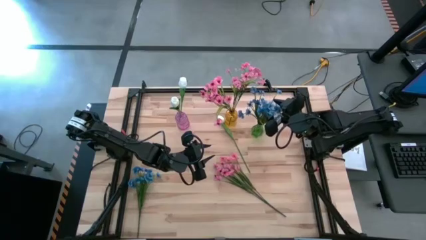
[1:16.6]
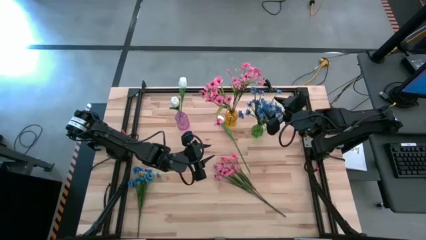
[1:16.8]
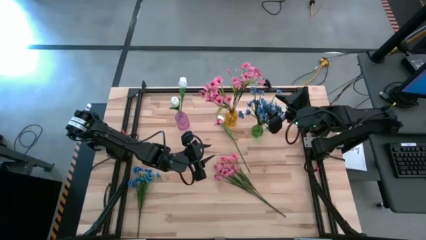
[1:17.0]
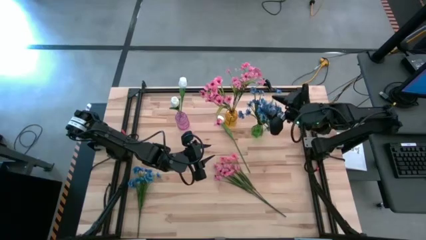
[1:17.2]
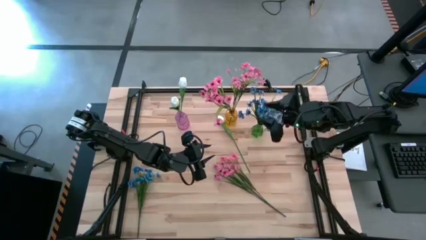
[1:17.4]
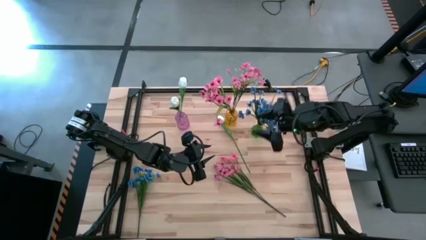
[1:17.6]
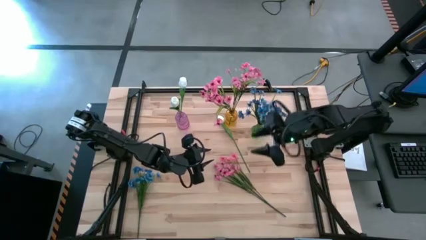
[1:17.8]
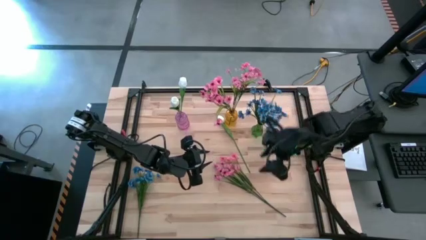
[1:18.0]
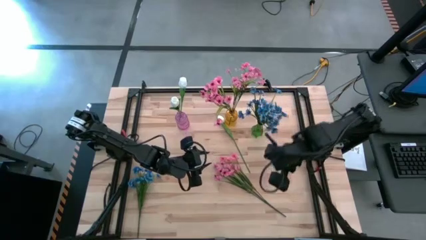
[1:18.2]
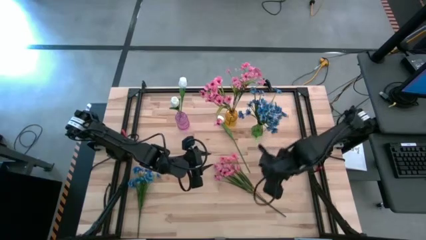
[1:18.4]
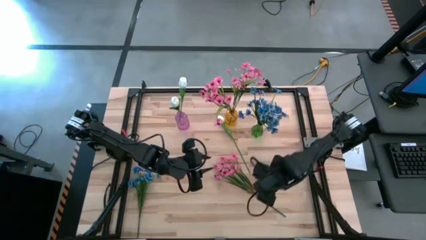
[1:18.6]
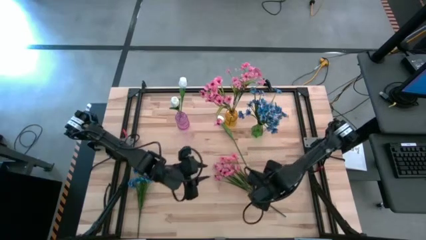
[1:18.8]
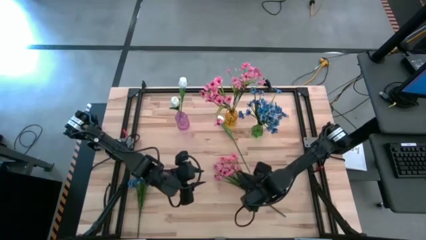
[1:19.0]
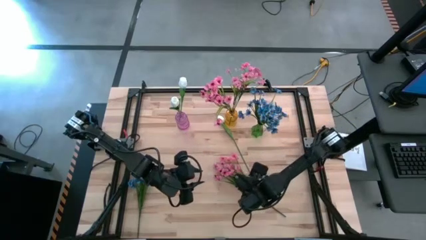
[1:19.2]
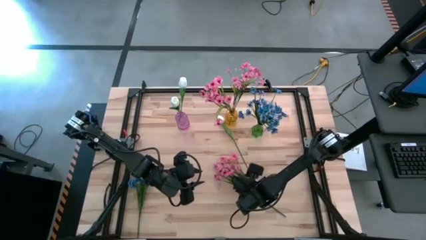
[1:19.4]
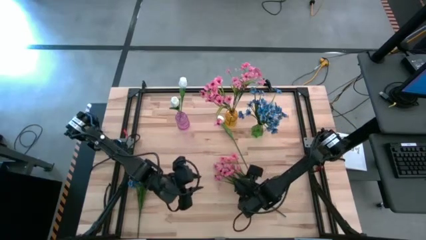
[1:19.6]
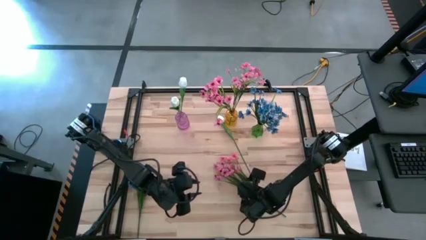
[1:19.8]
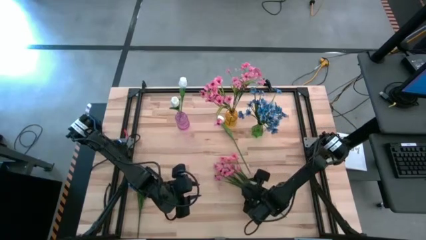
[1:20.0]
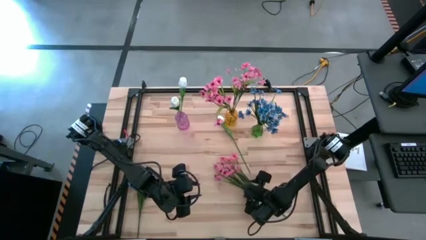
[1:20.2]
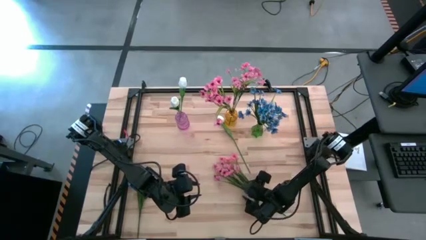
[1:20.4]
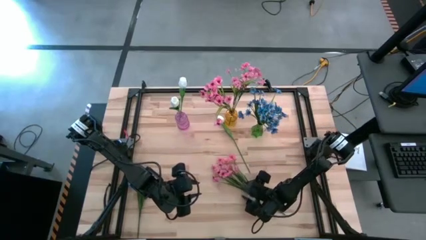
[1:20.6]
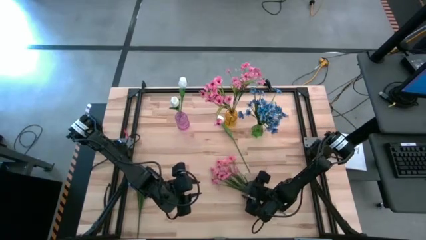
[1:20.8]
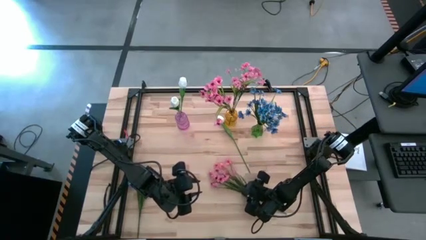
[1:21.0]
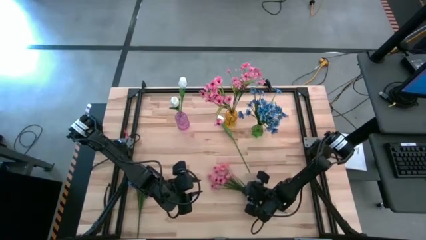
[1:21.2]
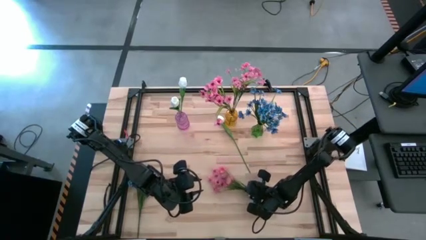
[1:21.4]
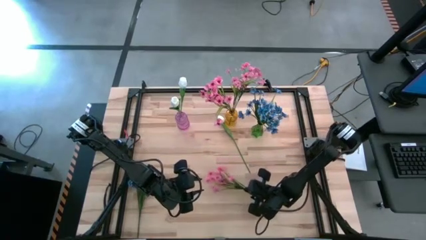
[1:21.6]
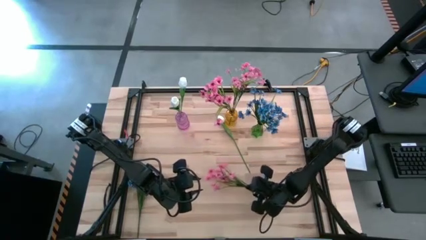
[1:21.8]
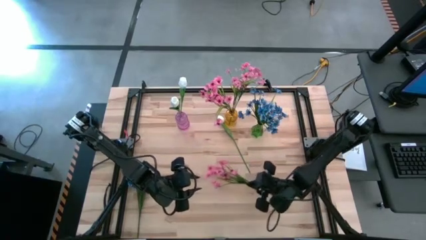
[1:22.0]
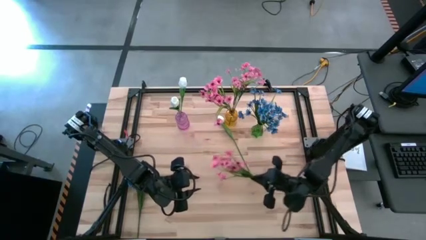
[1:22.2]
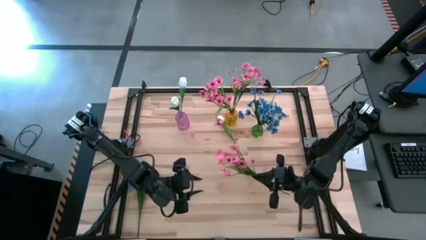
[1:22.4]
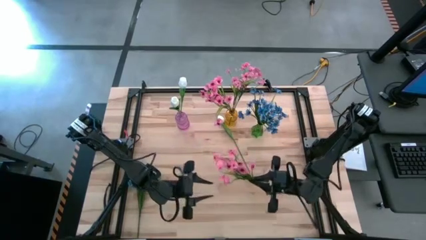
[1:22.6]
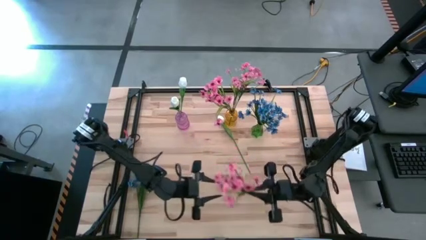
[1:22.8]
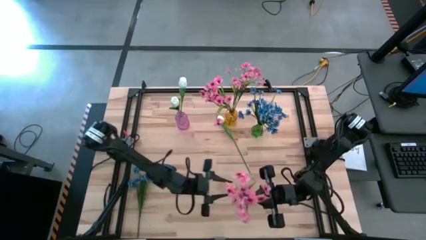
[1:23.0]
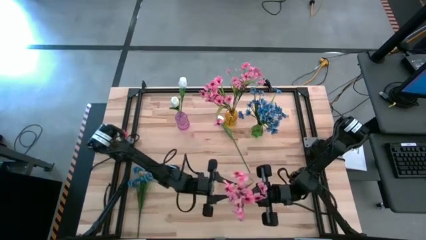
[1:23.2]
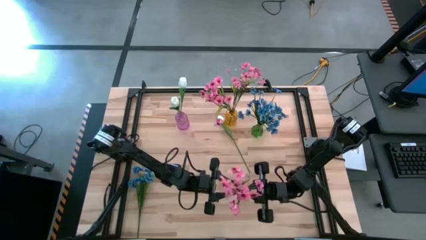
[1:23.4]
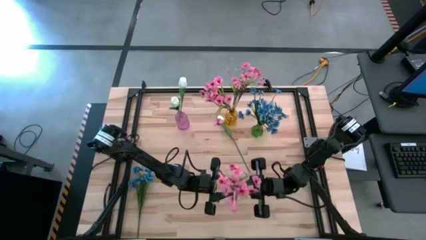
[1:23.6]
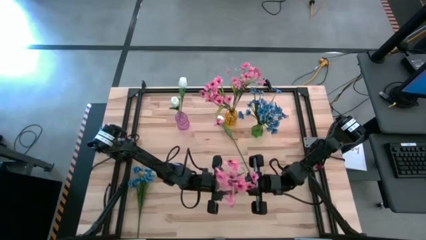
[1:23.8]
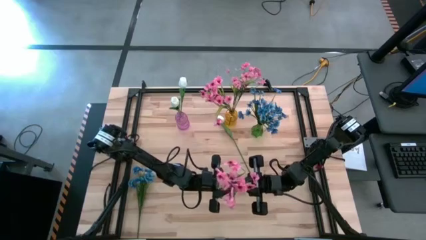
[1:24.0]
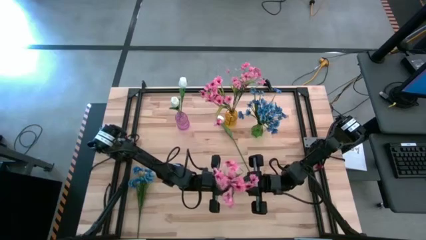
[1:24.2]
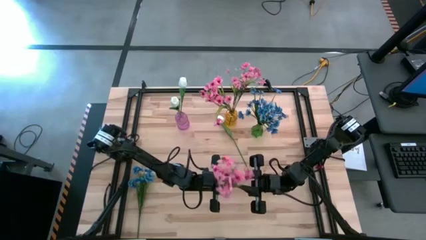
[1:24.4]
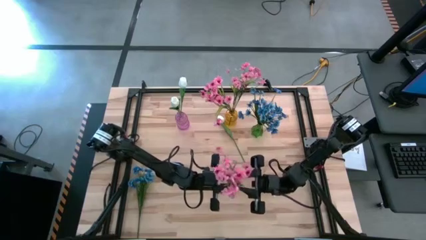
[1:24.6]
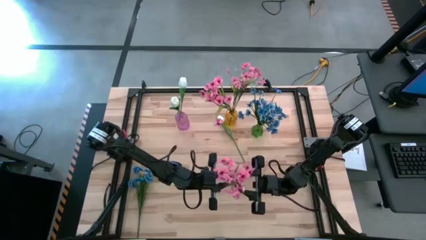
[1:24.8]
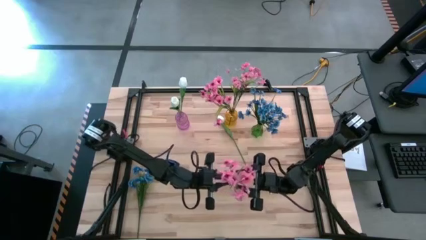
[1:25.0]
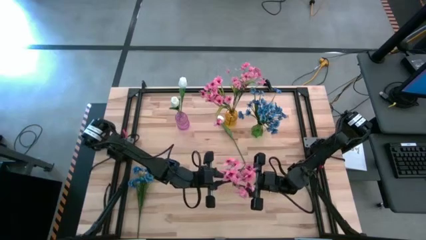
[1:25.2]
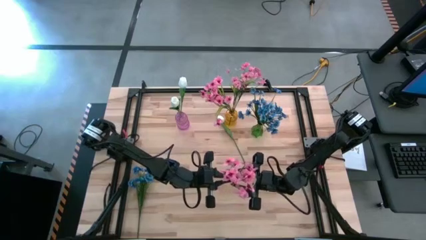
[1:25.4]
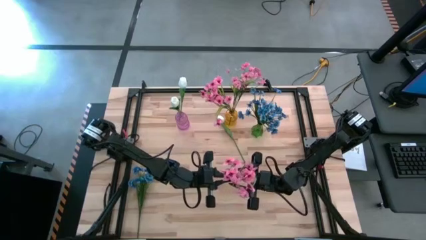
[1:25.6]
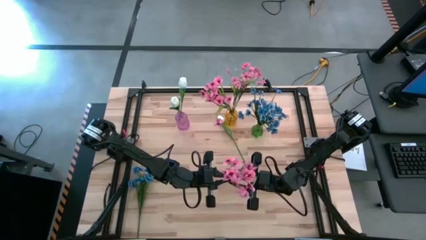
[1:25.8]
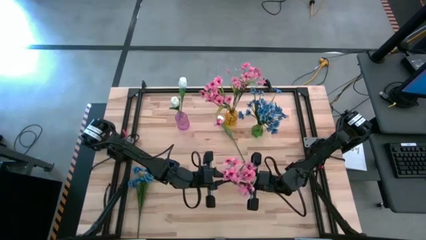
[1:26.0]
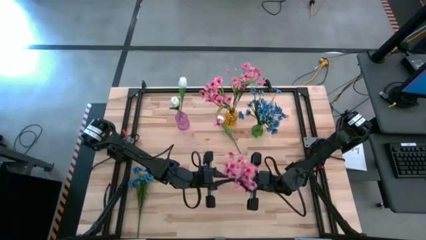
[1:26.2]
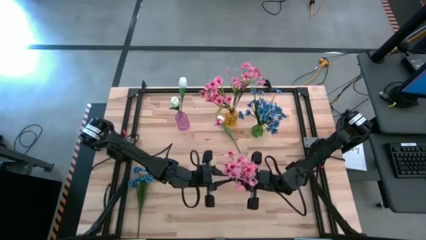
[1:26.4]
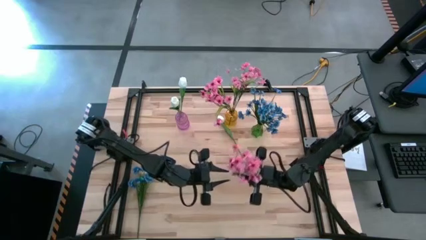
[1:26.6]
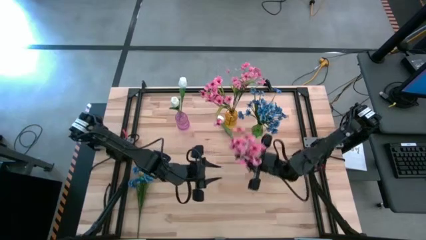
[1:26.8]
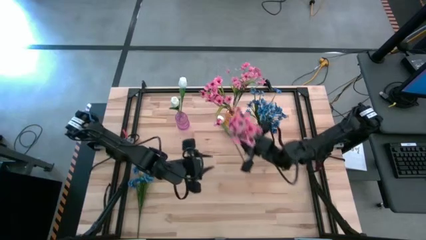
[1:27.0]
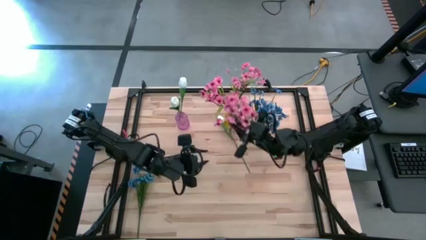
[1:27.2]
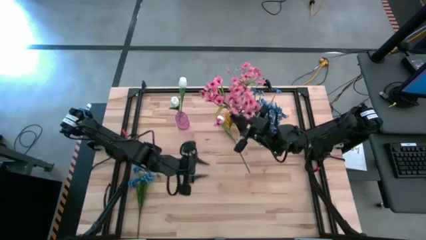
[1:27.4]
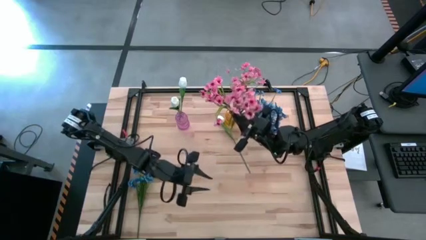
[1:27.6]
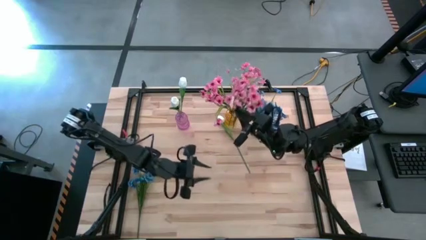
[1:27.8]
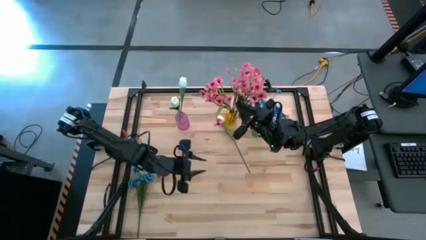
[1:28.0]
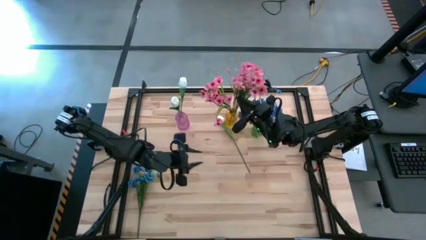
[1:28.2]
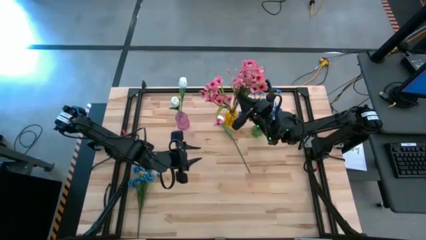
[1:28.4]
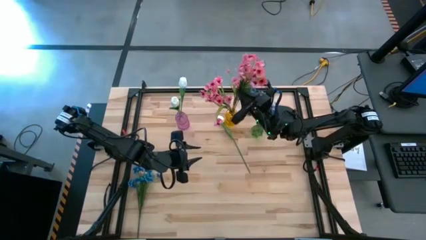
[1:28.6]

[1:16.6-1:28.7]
Task: Sort flowers into vase by color
Put the pink flowers into the yellow vase

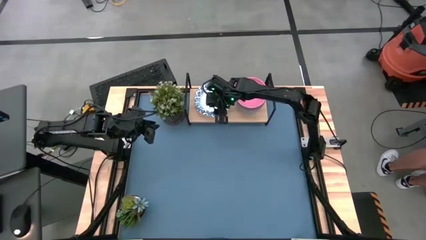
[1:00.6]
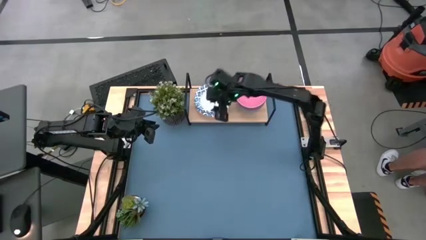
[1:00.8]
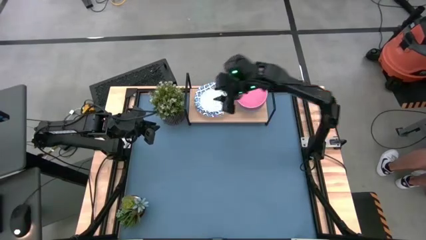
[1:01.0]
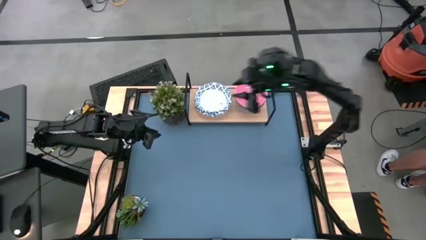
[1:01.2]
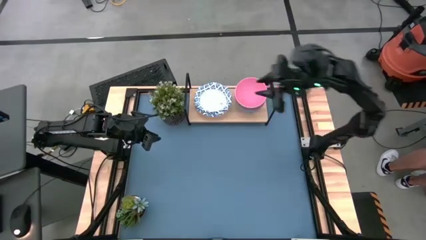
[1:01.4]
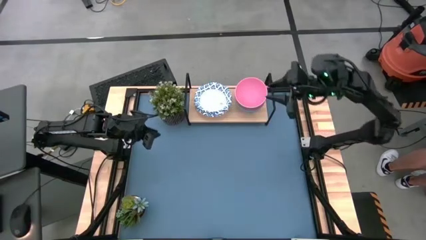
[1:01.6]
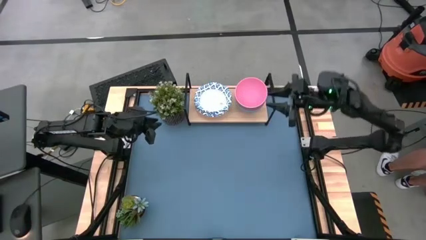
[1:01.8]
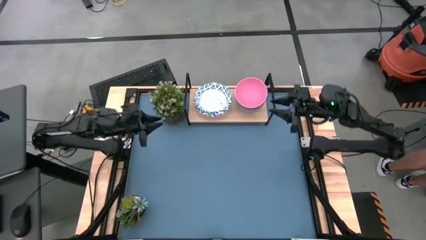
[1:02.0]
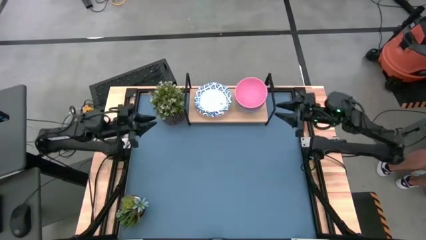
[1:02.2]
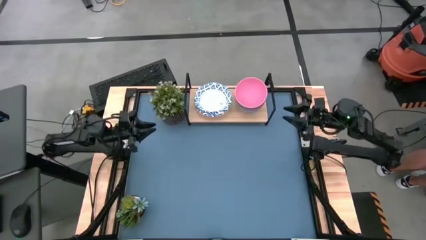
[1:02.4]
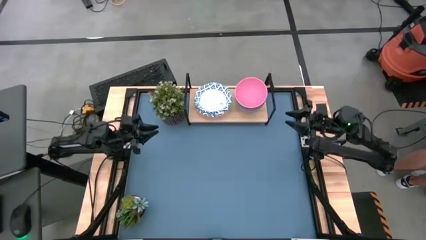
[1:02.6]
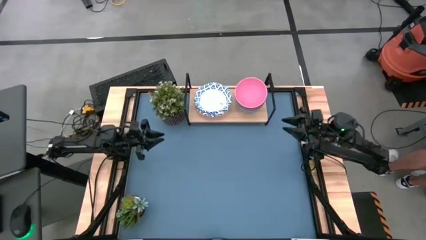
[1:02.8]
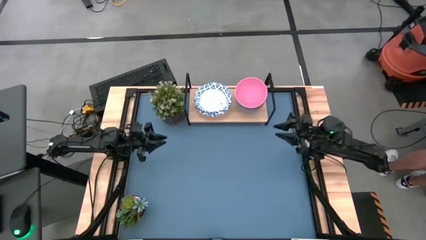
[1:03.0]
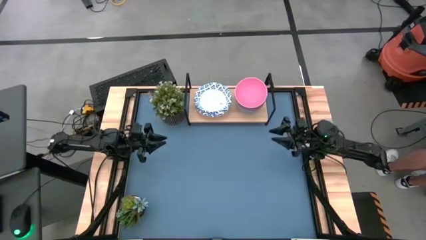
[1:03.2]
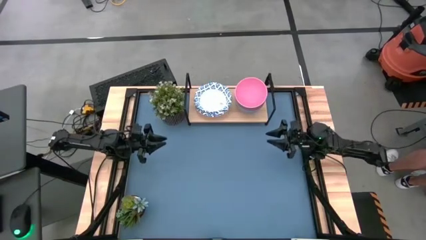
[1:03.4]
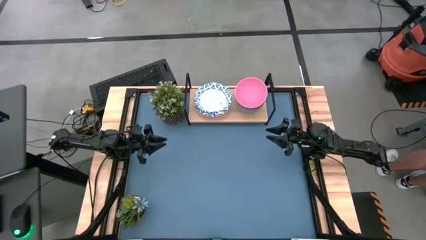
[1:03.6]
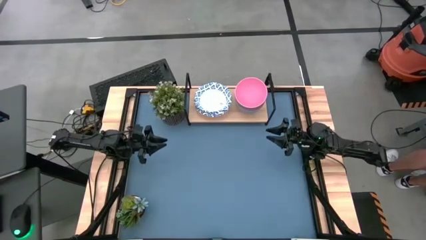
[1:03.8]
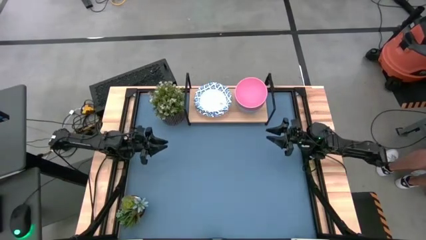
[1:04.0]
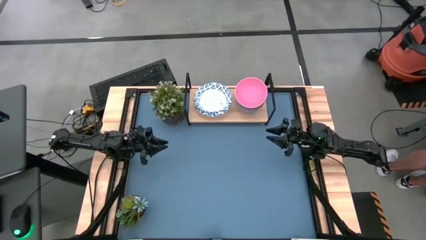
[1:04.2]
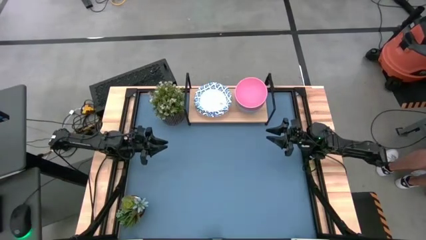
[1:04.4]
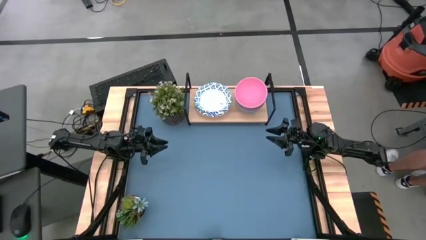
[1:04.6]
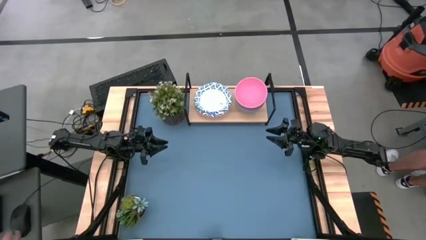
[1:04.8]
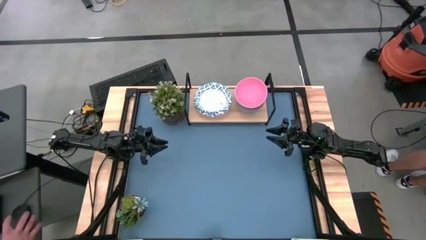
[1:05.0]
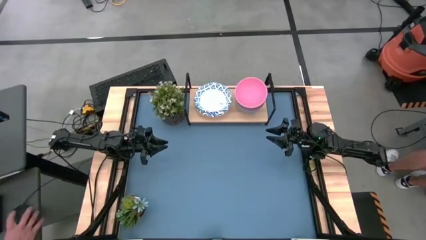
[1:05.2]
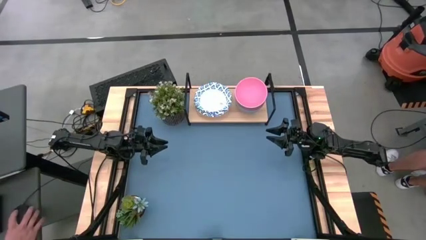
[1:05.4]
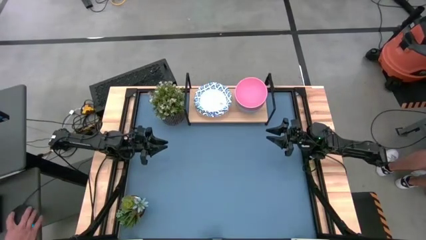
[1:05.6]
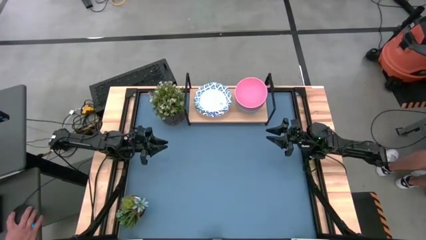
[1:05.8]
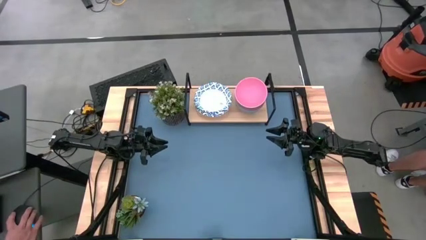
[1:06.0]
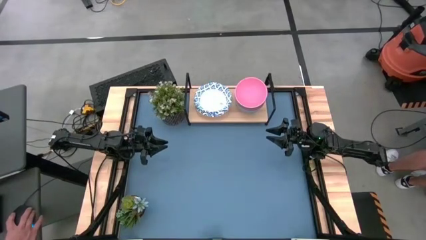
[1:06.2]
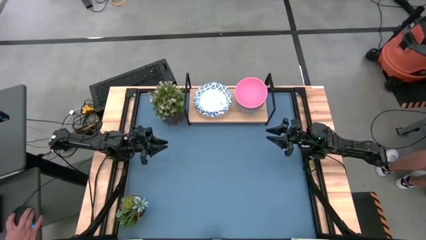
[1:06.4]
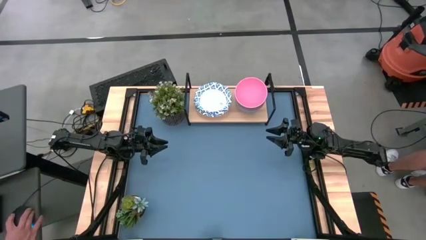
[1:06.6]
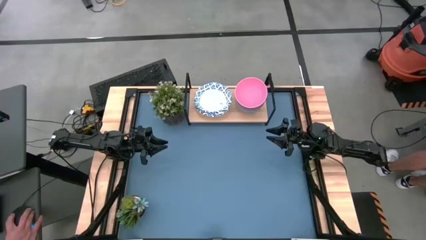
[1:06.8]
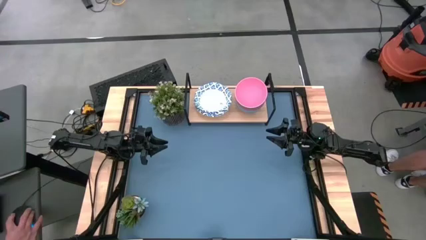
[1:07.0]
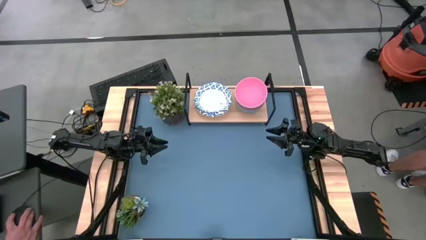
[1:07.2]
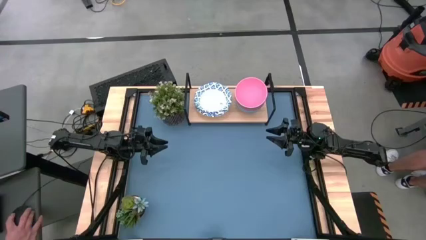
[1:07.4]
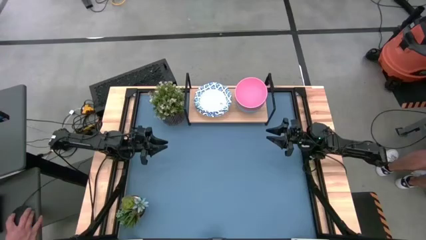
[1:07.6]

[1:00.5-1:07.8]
Task: Place and stack bowls onto a shelf
Return to Home Position
